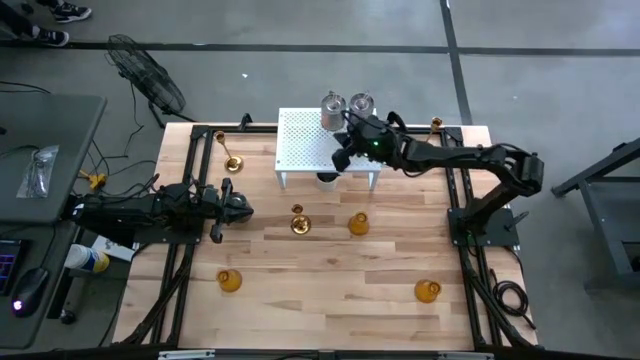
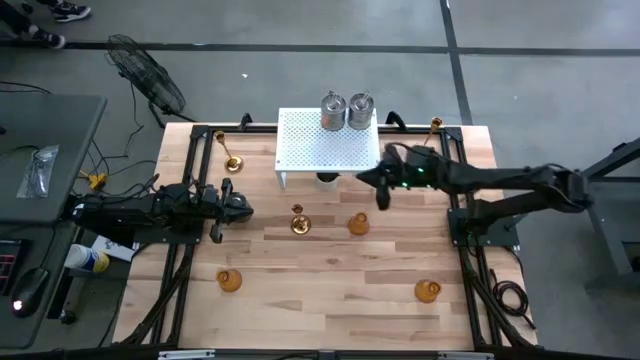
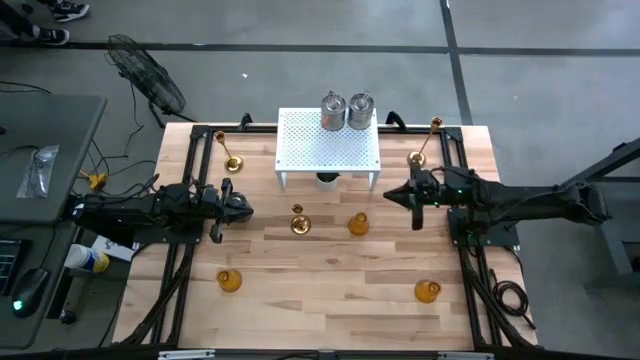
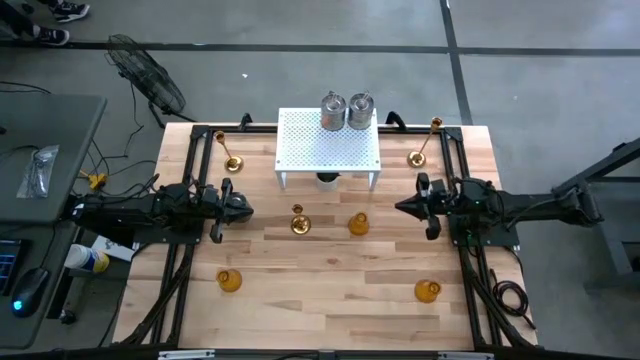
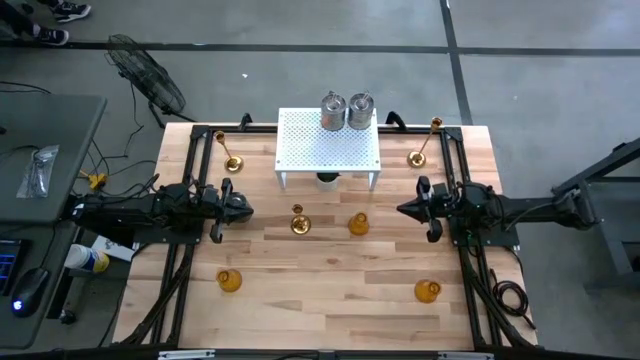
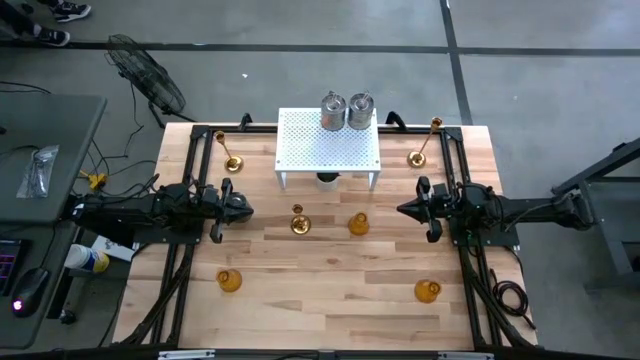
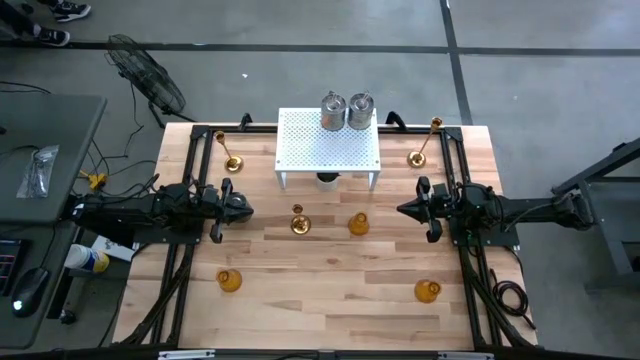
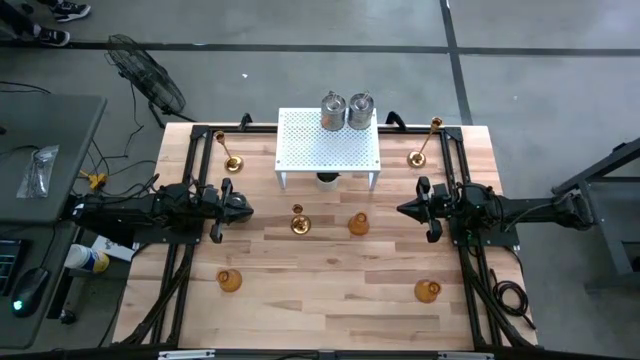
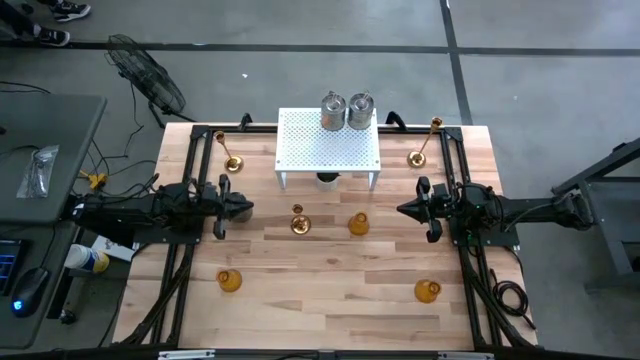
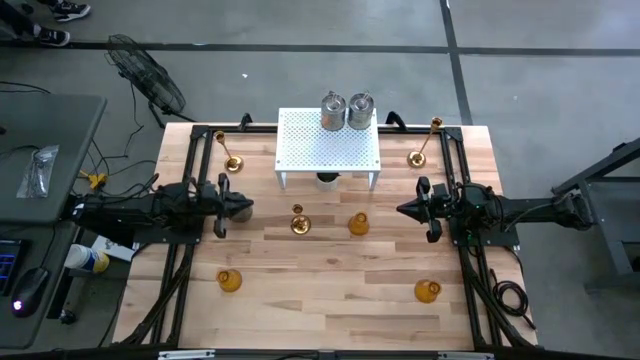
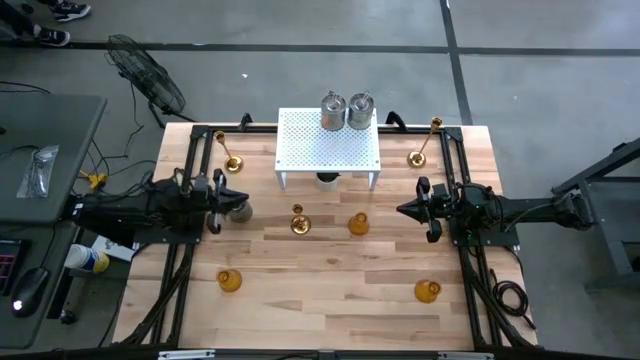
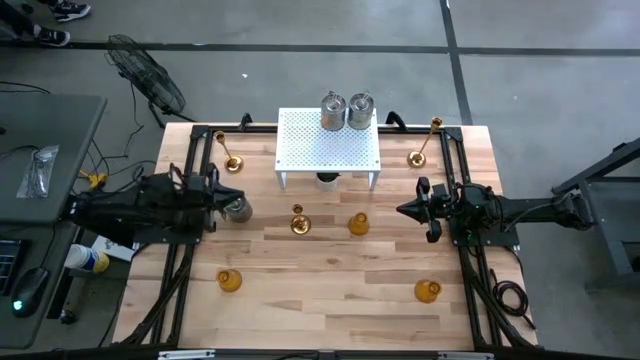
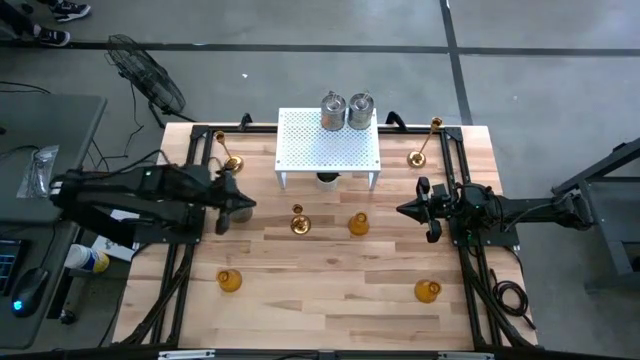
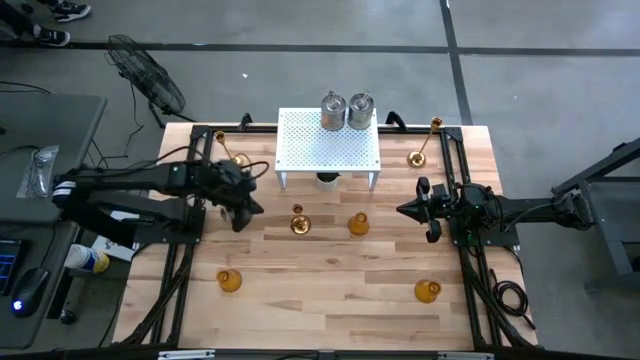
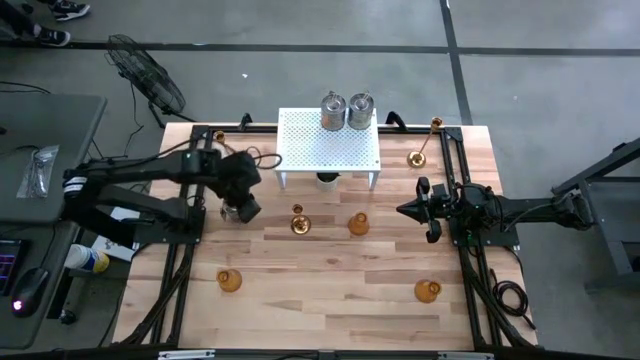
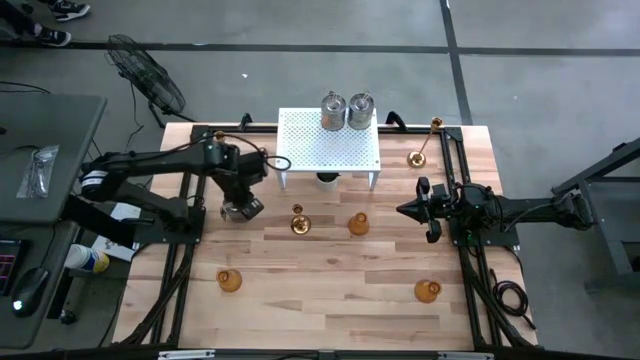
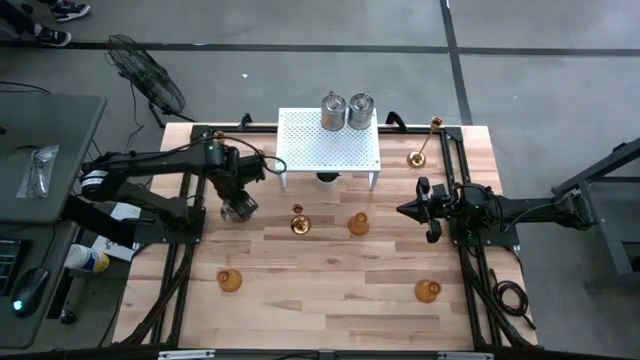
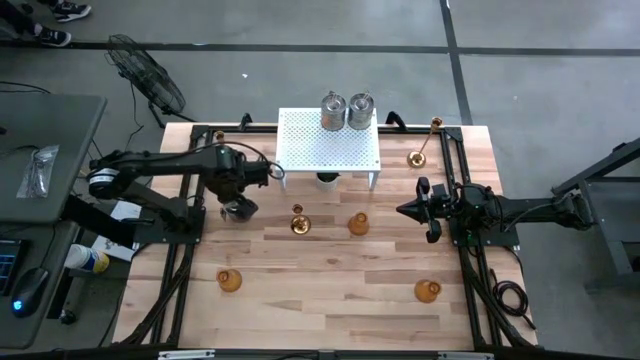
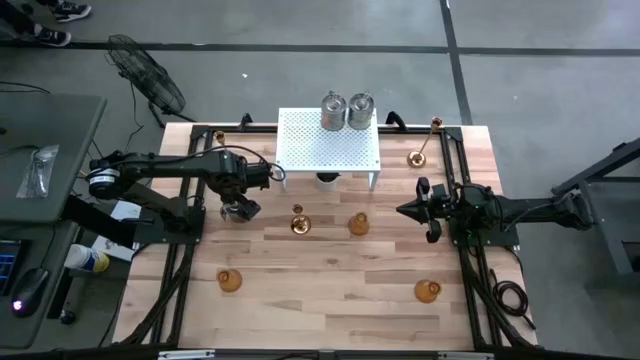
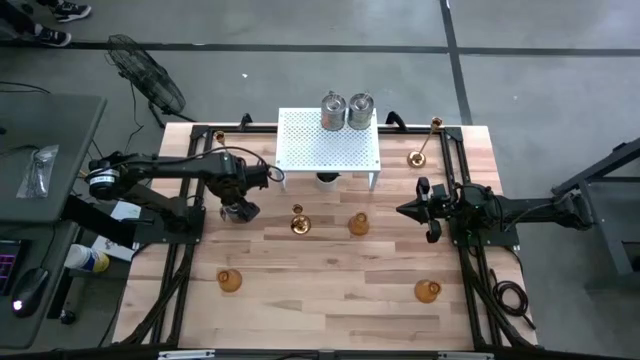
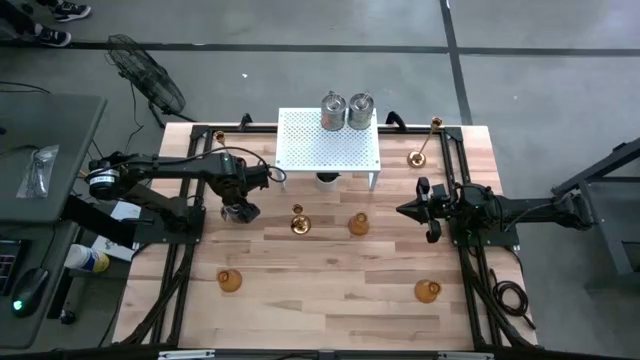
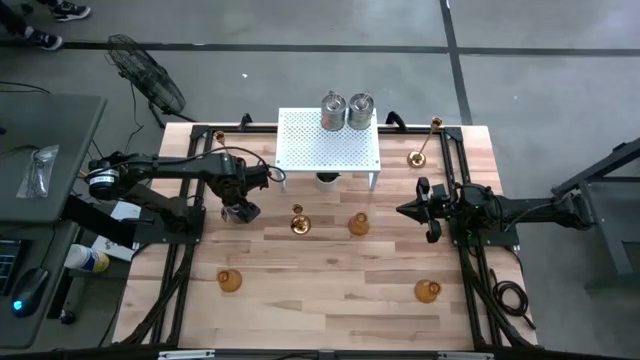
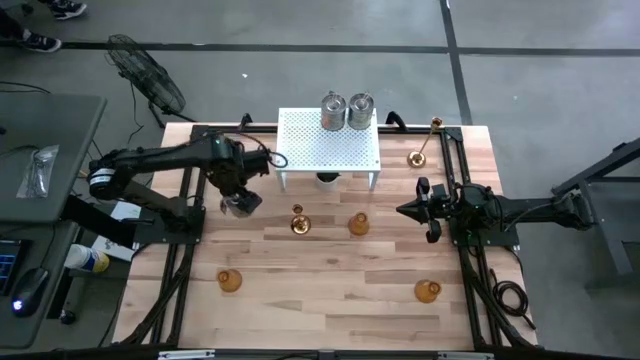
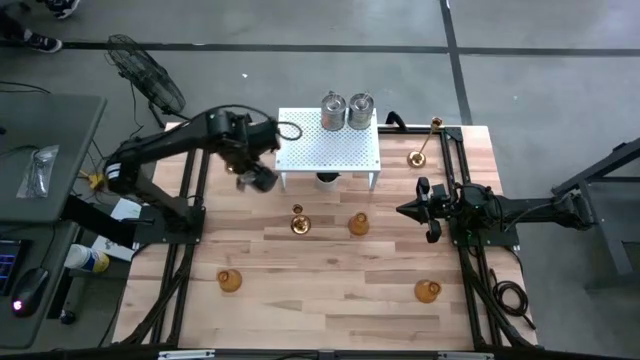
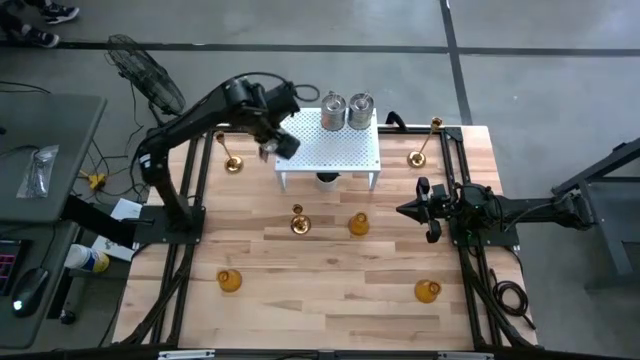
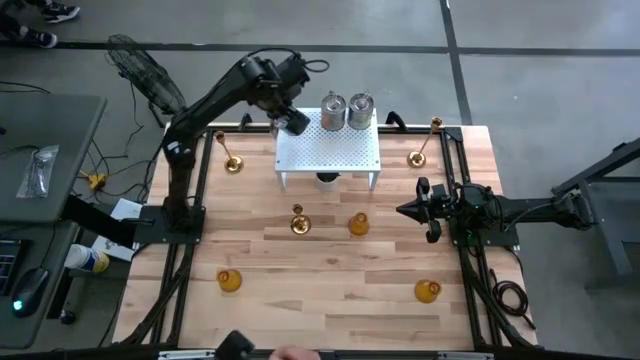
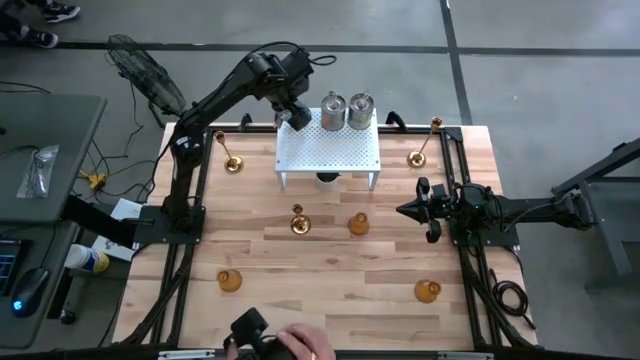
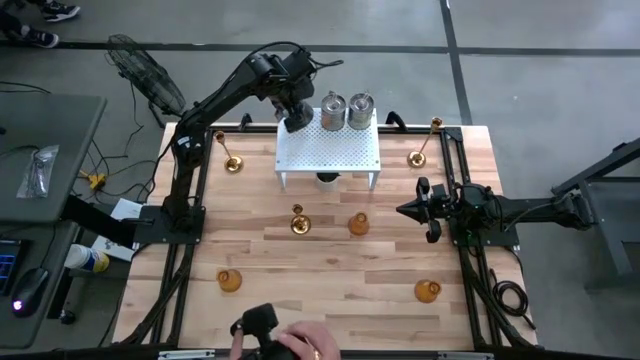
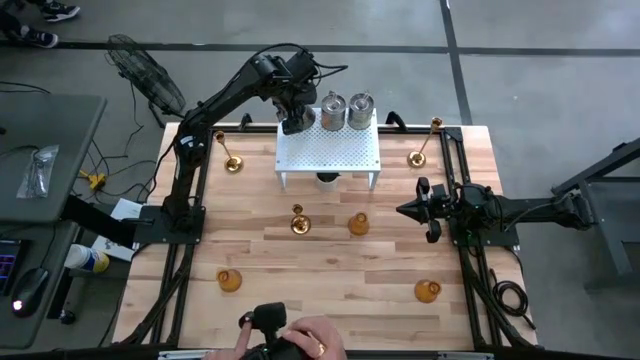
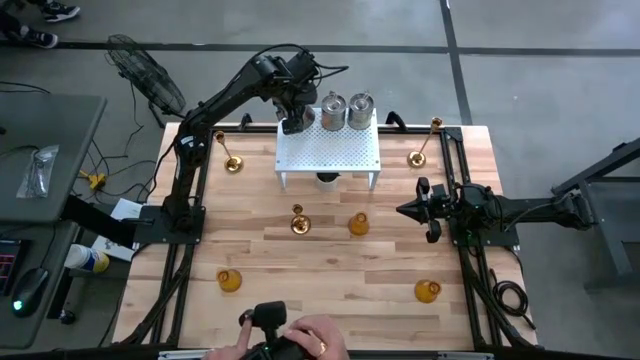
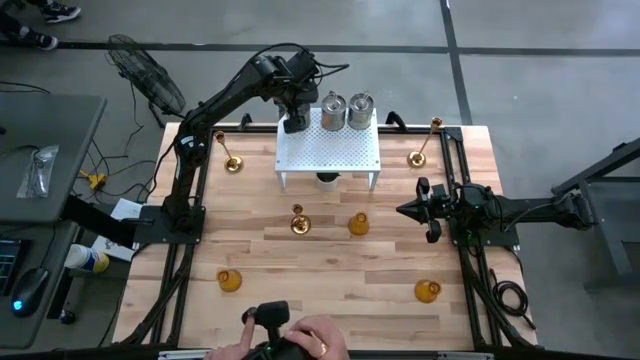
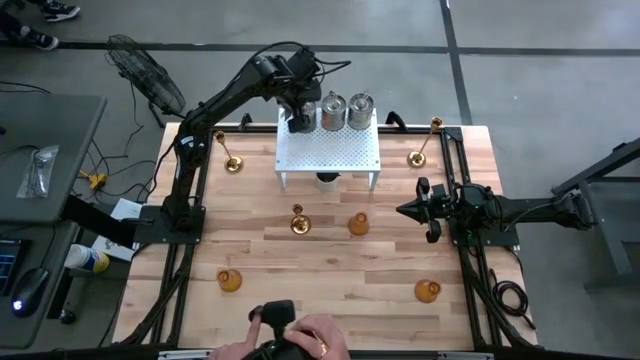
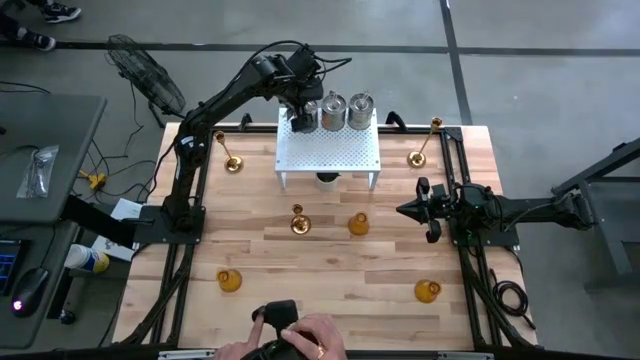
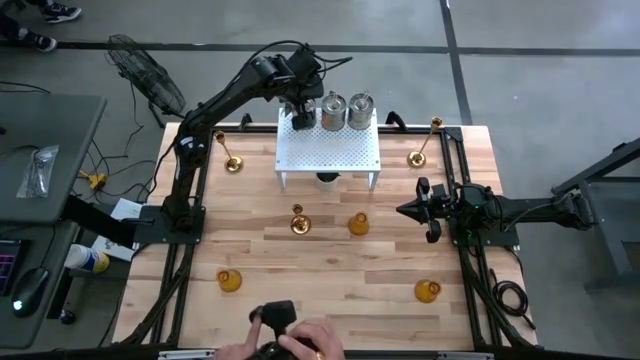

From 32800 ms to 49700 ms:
Task: Pick & Place candle stick holders
Put the orange scented candle on the shelf
